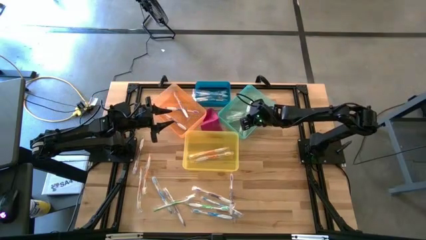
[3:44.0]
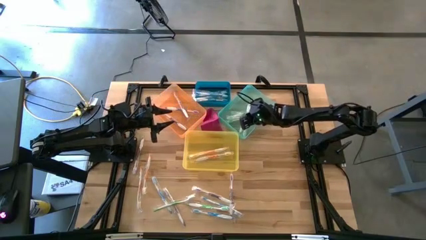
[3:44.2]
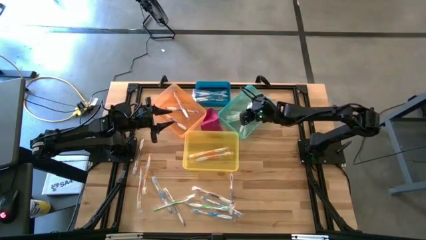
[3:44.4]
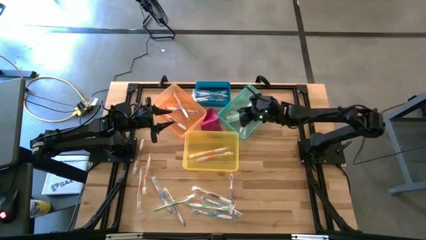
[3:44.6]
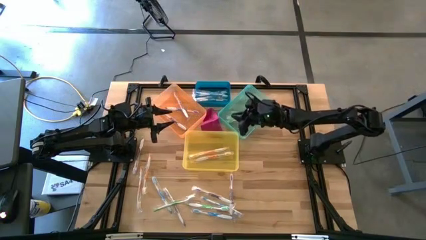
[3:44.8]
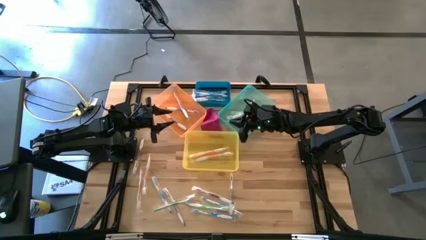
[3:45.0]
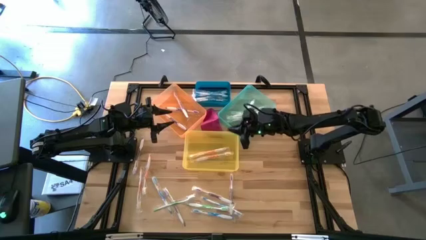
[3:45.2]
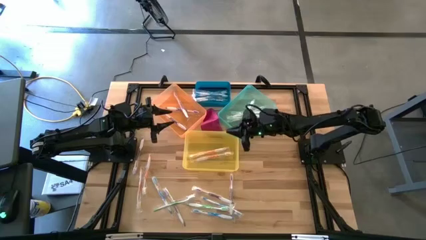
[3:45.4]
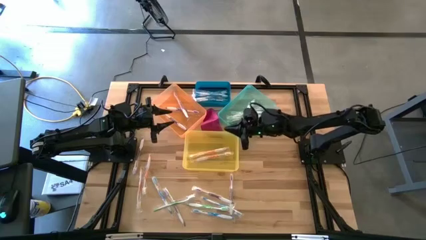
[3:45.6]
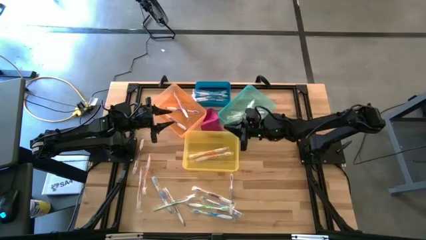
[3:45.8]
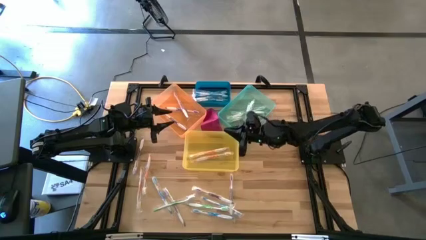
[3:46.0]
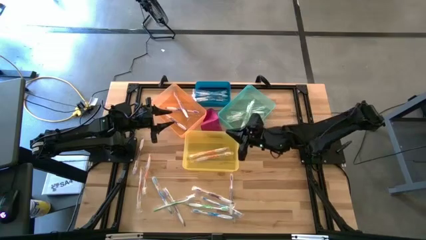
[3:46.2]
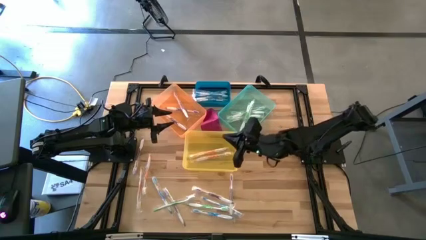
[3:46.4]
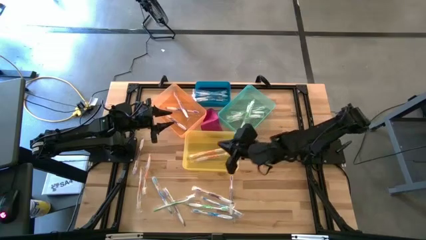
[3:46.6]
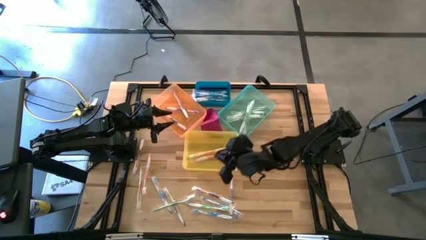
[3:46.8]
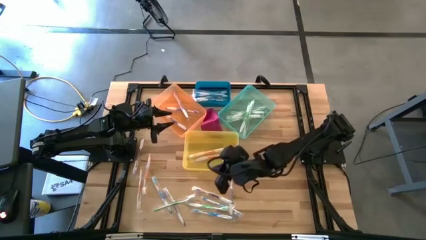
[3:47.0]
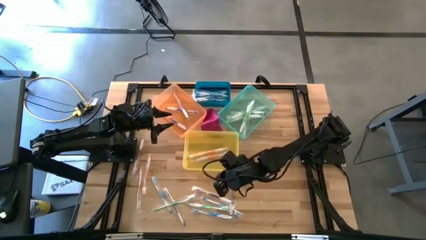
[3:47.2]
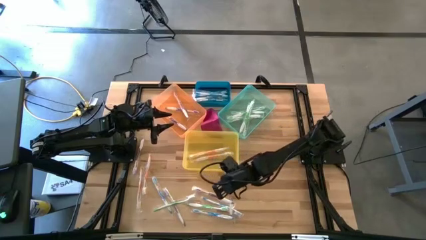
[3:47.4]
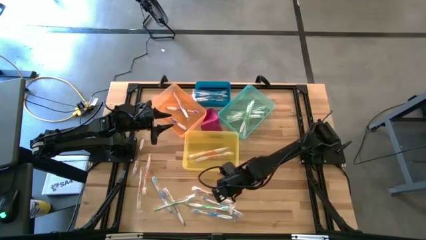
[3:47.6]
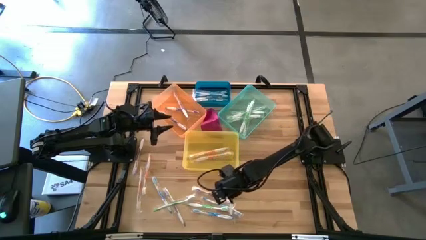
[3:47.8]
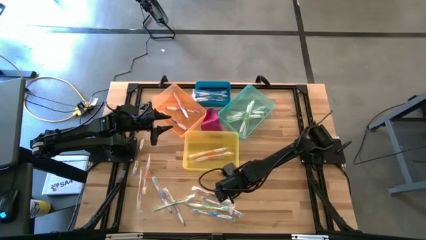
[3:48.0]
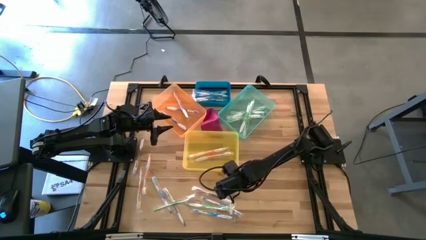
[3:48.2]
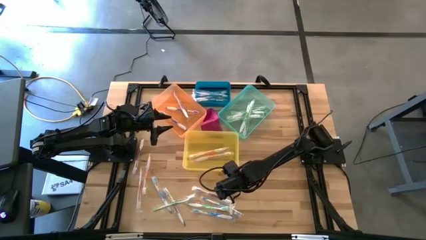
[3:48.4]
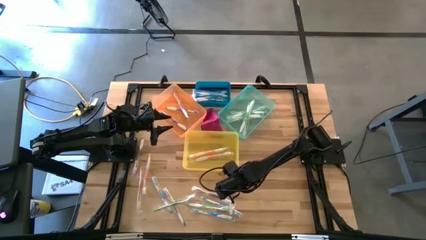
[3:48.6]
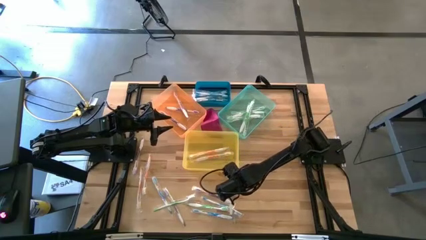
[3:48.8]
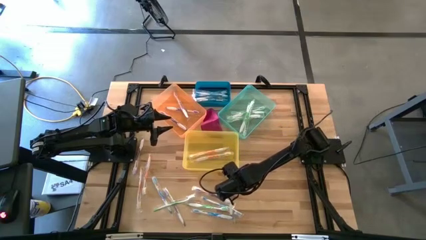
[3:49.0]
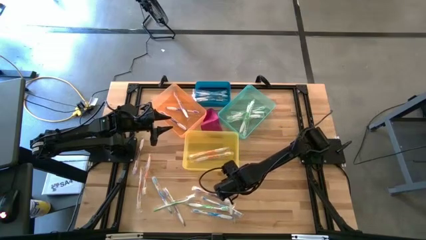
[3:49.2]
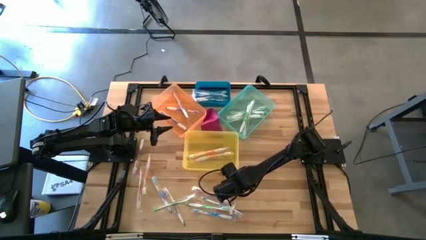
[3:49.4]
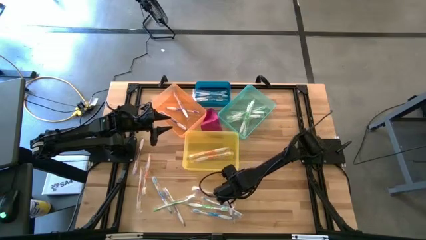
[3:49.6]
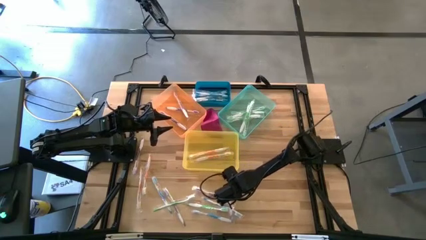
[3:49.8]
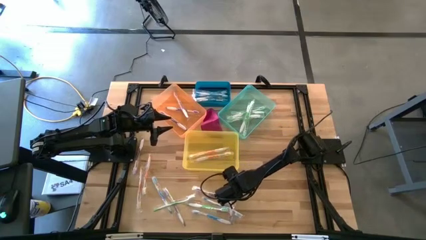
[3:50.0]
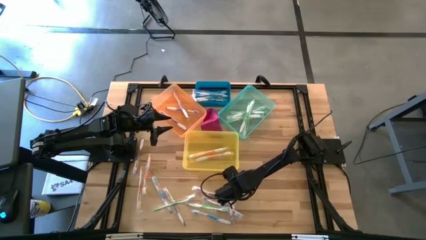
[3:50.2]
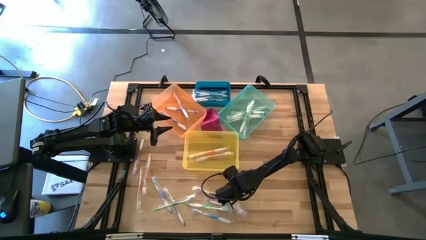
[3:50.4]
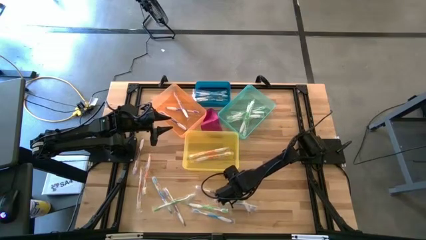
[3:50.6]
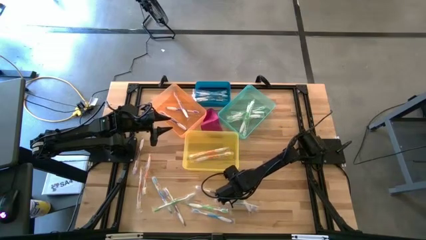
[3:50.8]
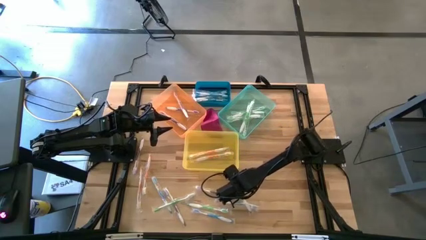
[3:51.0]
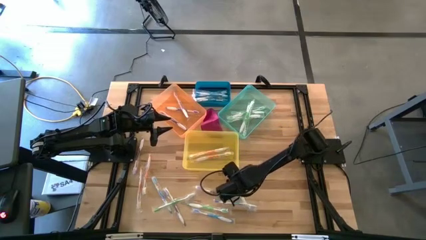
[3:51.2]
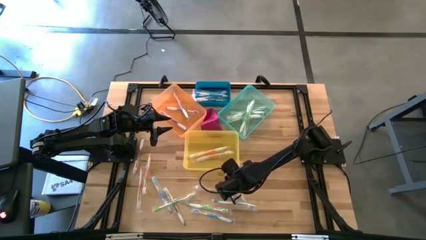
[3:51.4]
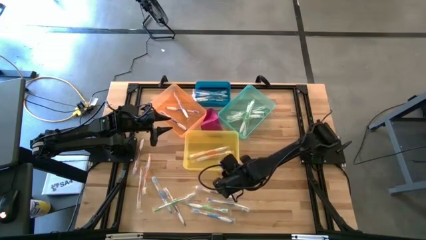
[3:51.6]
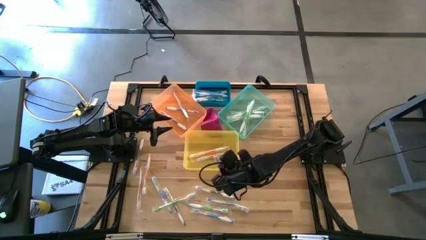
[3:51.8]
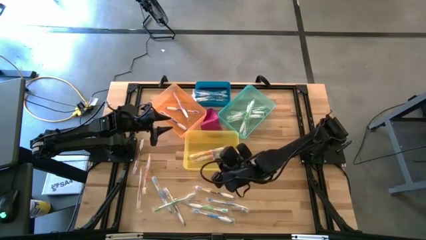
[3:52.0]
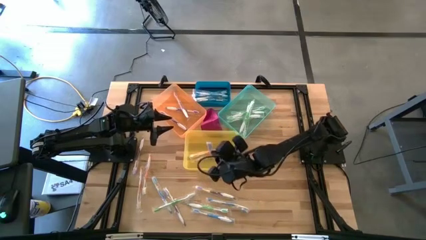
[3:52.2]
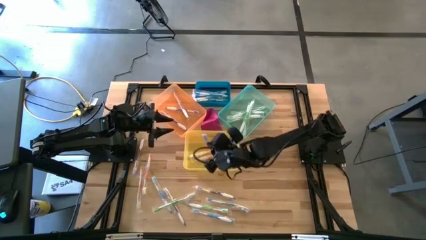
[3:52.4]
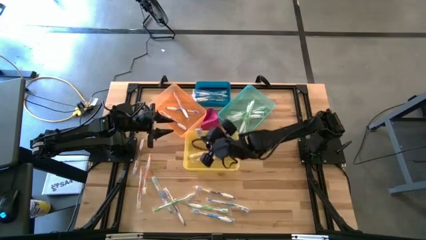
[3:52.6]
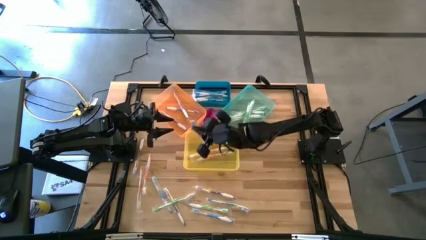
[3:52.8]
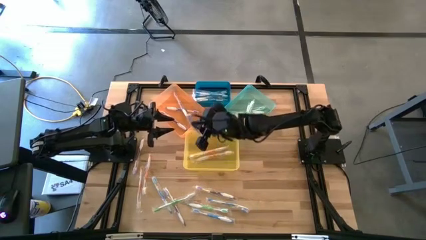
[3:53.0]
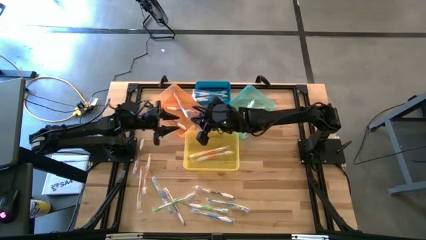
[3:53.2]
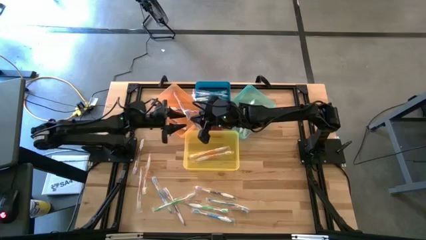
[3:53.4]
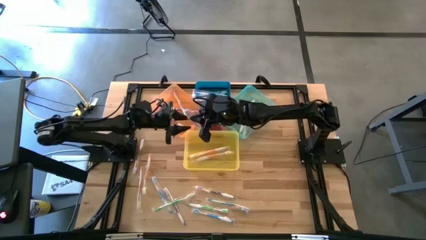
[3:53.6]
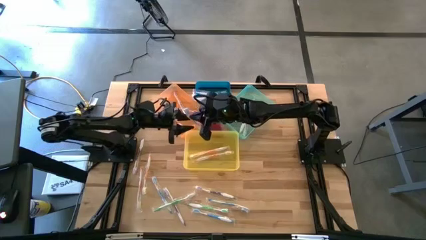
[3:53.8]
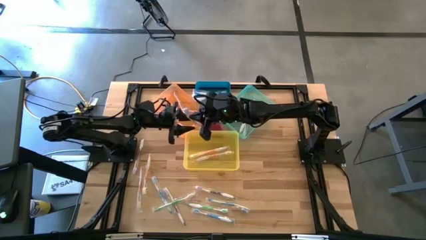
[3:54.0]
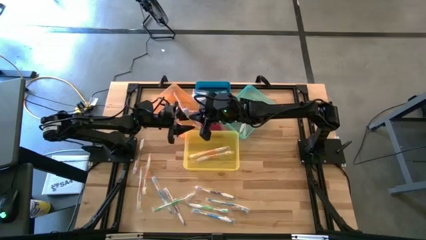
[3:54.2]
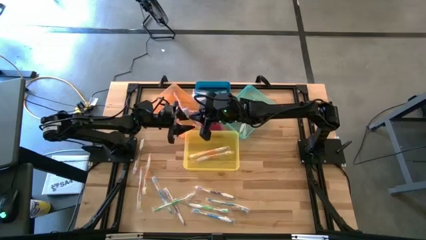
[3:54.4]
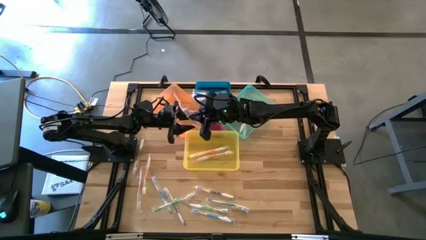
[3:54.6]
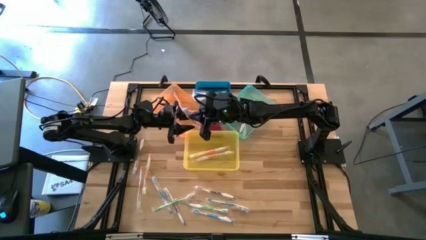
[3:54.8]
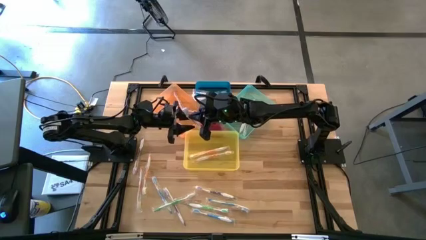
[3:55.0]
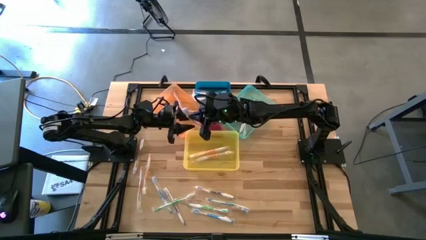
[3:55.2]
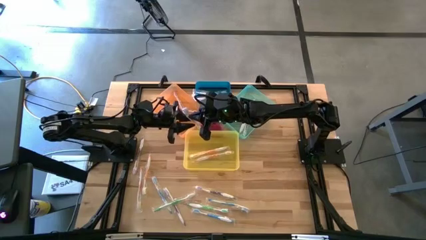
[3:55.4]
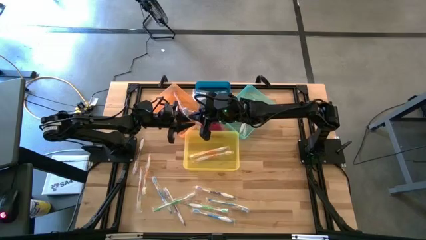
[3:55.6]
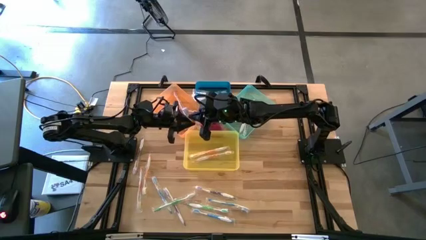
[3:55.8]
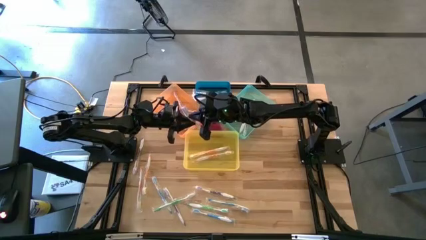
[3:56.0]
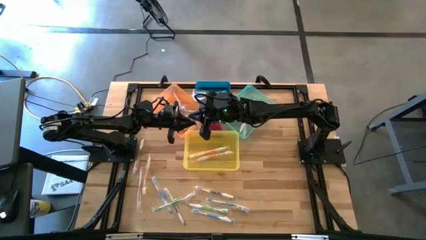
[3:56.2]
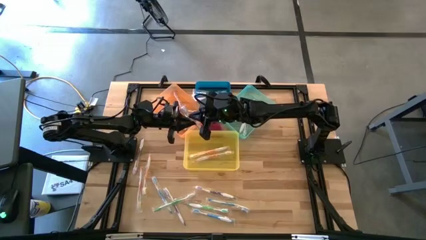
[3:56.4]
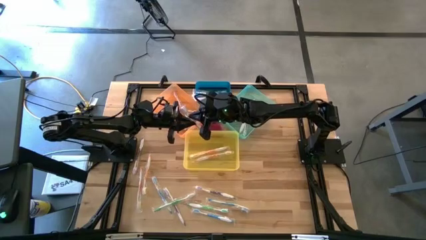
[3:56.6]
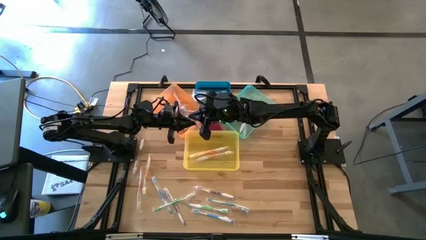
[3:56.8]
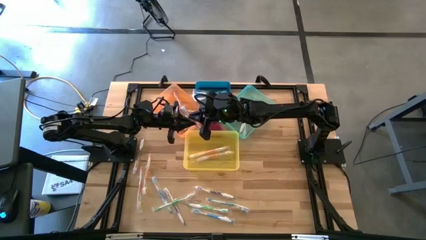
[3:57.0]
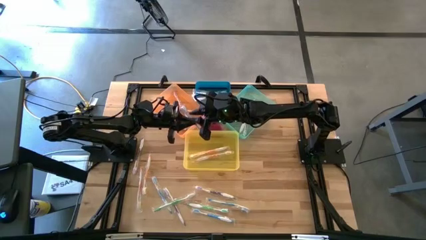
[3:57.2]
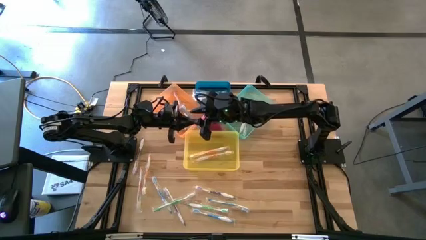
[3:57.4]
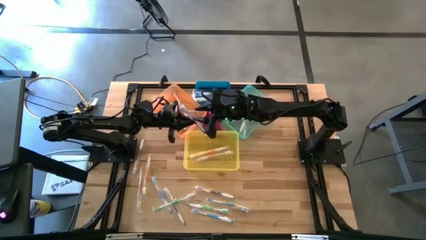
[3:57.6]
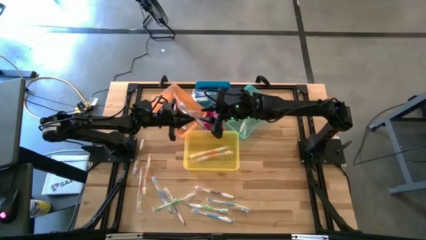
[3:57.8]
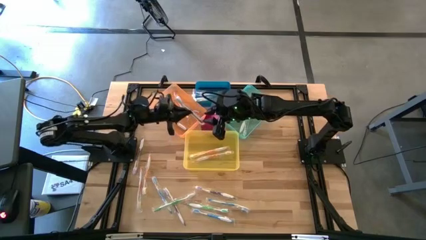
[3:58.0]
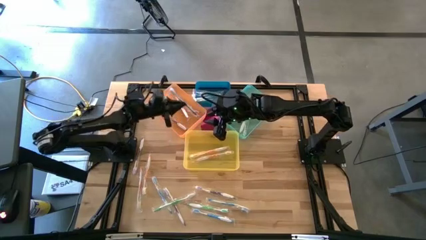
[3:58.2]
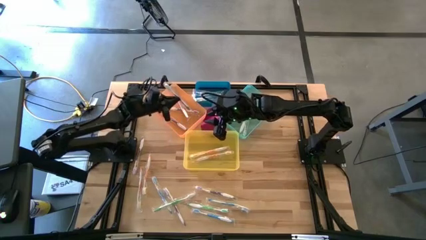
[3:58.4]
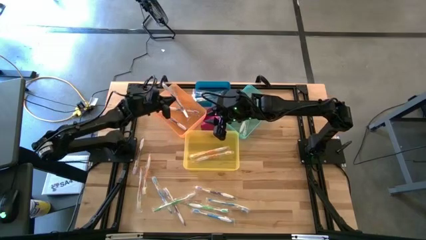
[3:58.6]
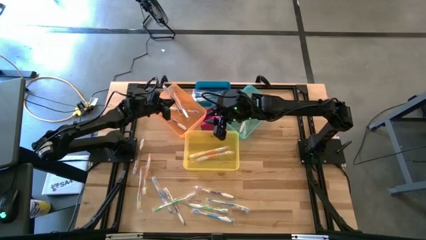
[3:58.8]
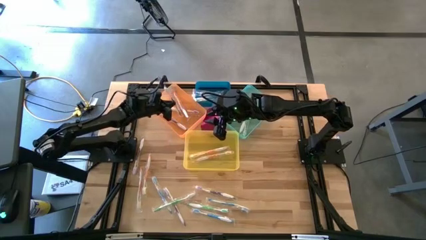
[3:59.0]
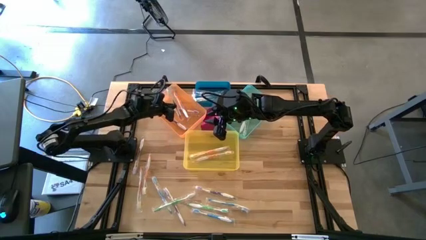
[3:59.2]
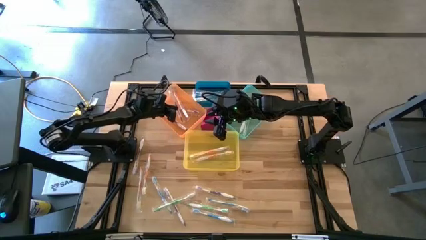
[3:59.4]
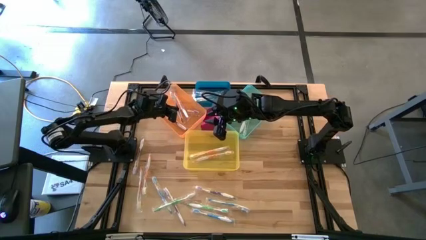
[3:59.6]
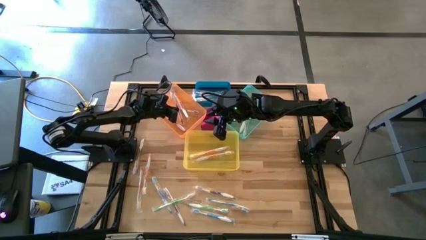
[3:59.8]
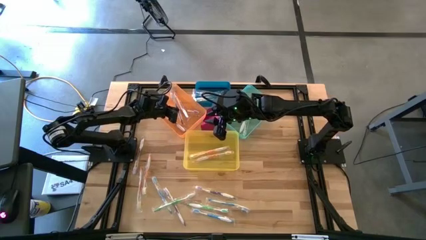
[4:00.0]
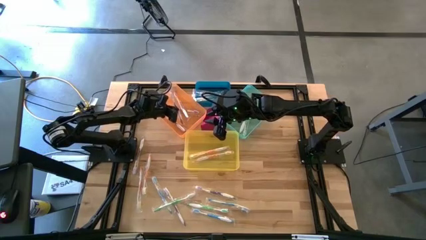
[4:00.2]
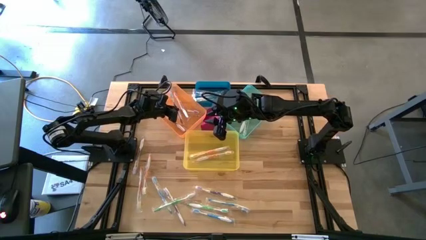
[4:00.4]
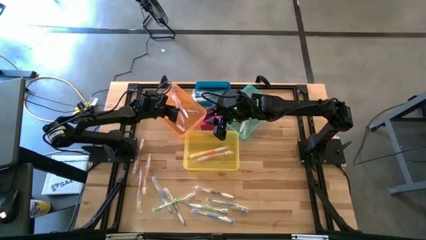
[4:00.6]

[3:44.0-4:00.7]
Task: Pick & Place Toothbrushes
Put the purple toothbrush into the orange bin
